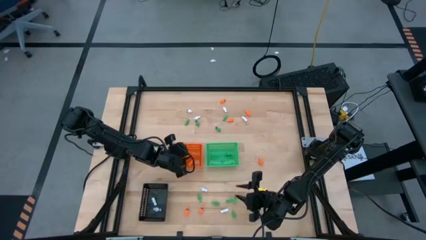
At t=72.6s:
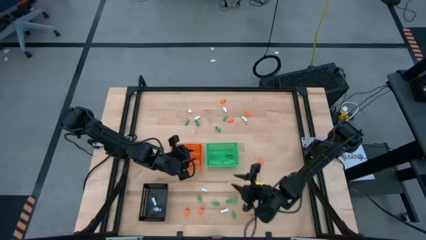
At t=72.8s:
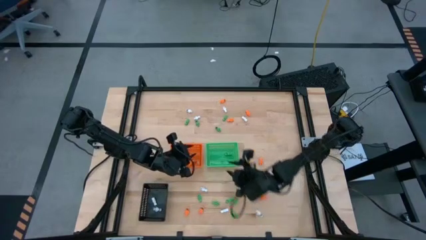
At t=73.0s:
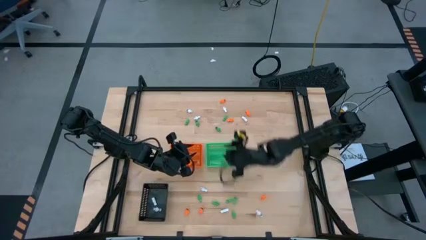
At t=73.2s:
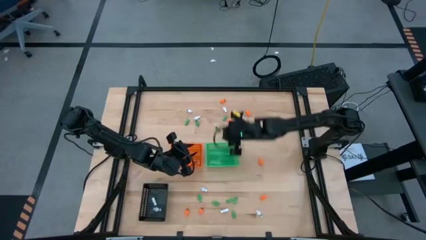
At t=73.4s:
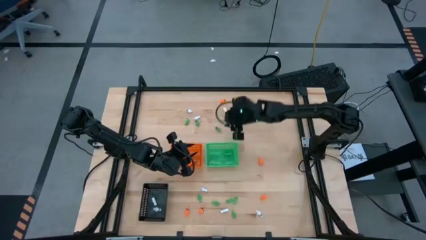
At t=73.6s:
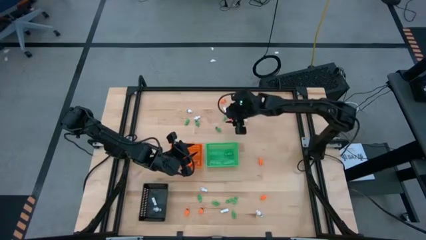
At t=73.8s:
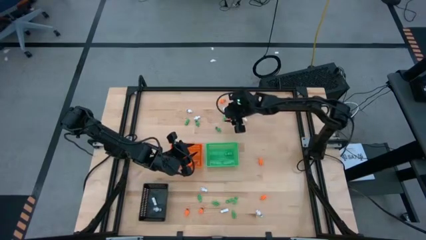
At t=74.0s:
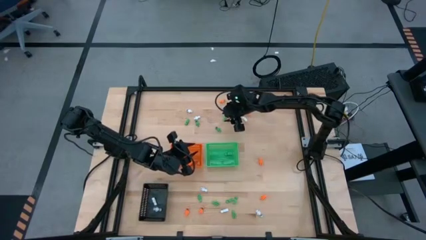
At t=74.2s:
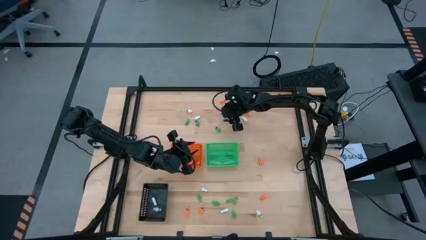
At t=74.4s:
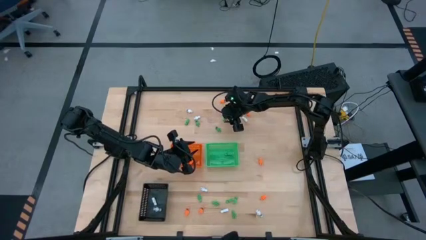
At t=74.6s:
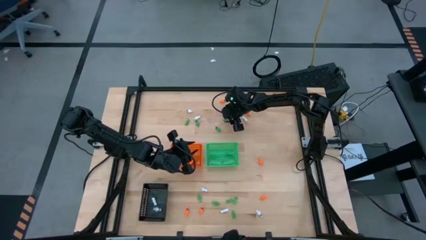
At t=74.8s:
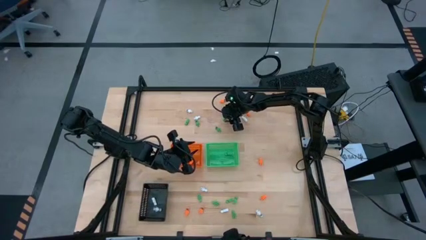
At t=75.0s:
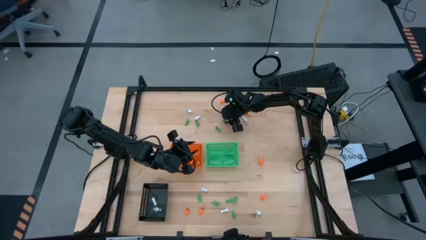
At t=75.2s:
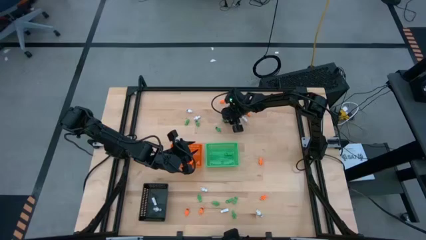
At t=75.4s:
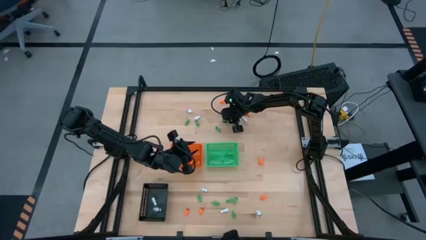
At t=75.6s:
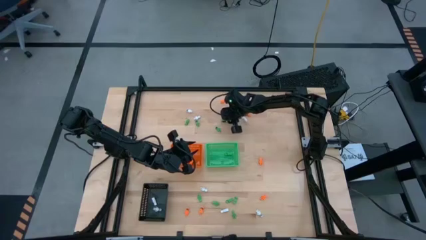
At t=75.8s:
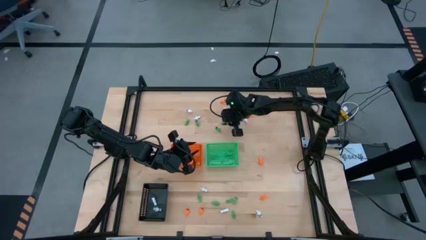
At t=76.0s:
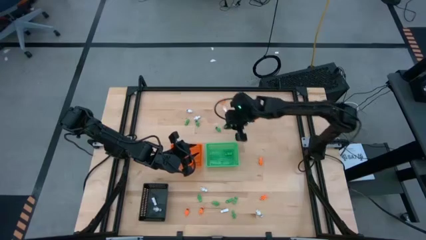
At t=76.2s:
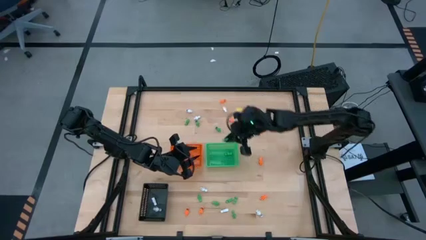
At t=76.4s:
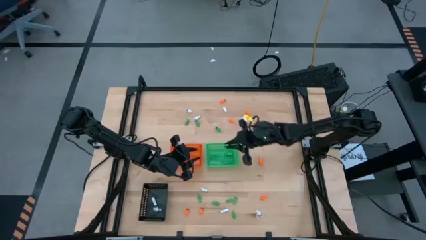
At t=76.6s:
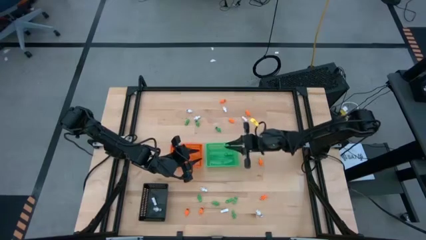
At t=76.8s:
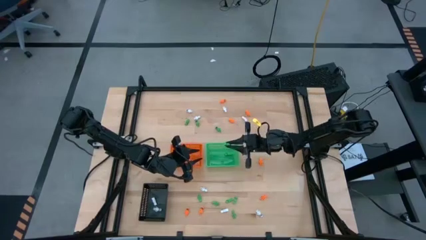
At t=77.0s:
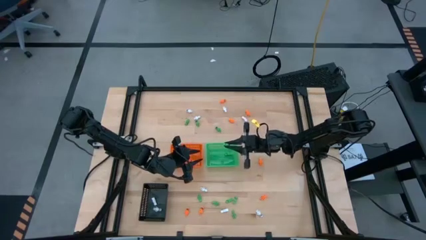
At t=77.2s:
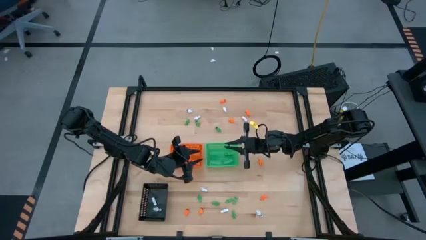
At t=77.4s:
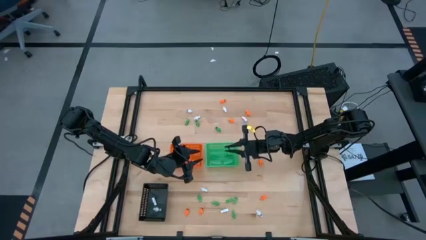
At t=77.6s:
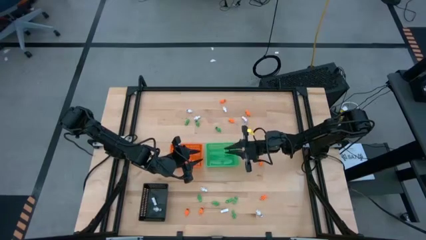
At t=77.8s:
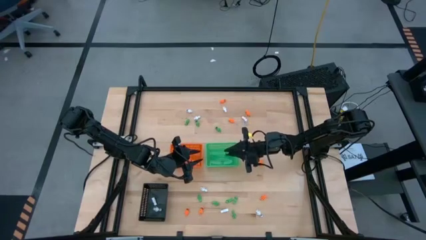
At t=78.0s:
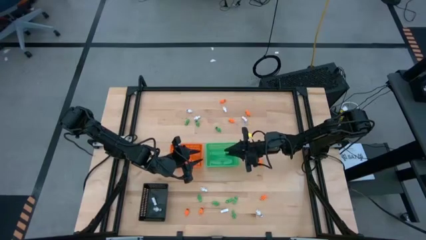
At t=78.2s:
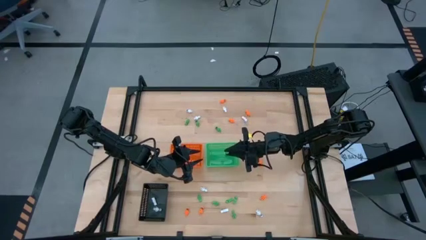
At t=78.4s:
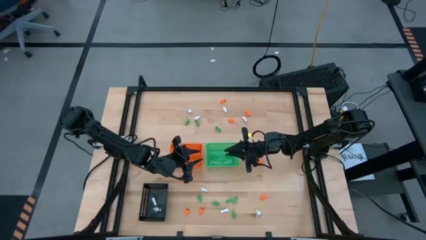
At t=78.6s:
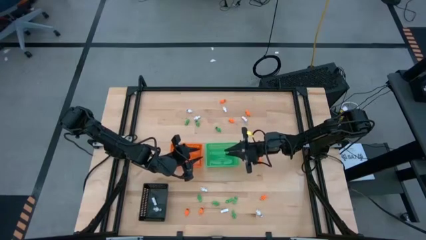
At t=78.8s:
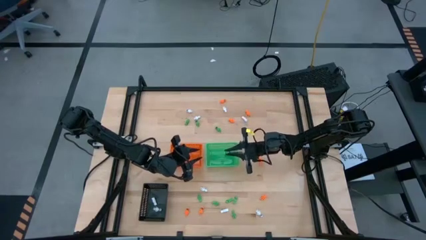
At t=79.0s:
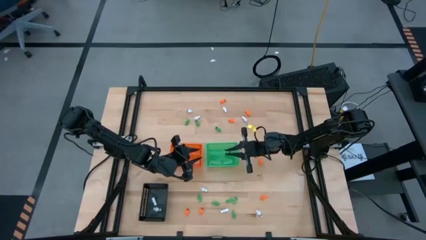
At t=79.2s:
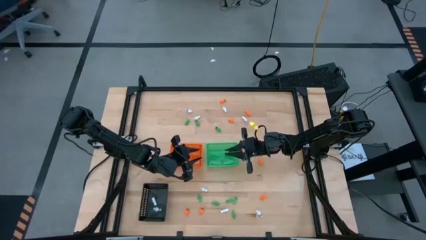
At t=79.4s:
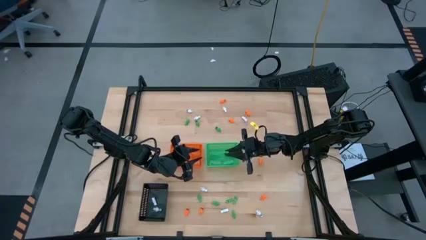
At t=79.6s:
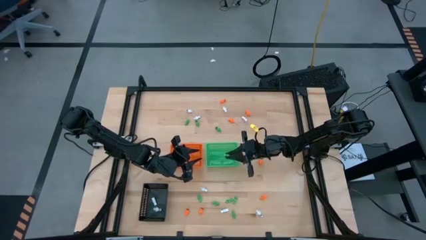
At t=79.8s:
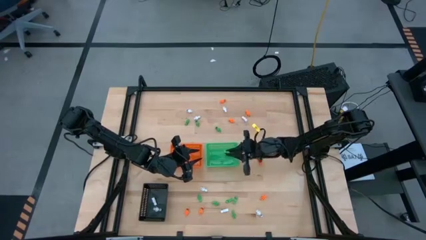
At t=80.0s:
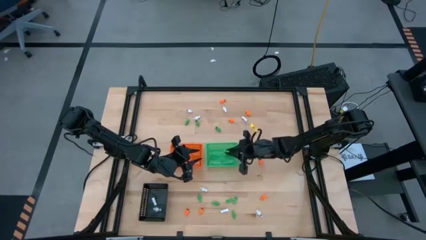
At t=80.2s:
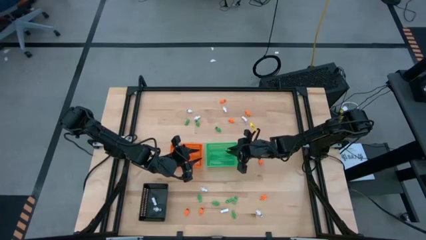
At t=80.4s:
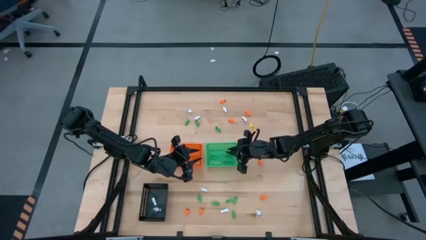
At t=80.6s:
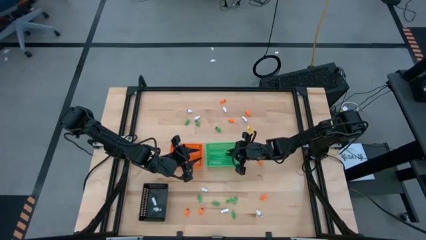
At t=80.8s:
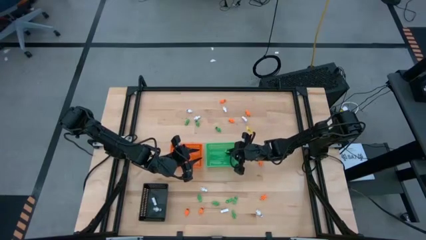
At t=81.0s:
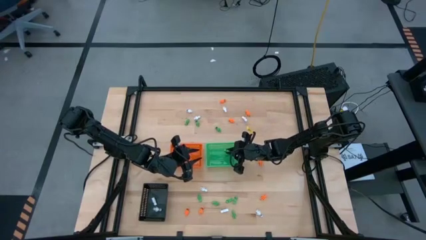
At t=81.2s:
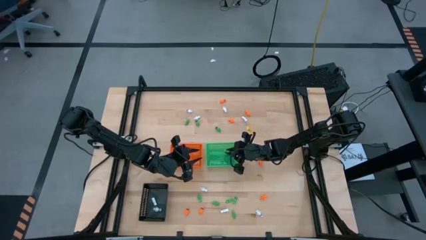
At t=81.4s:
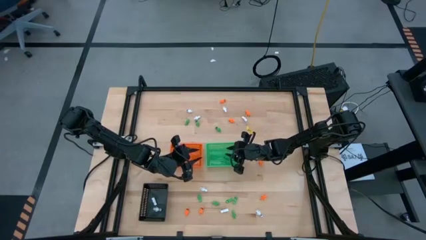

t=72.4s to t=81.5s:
Task: Sort Halloween decoration
Put the green skeleton toy into the green bin

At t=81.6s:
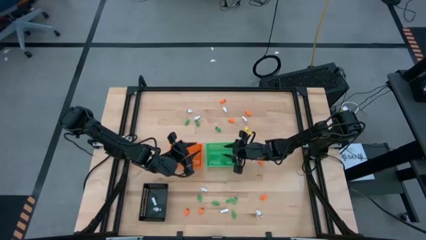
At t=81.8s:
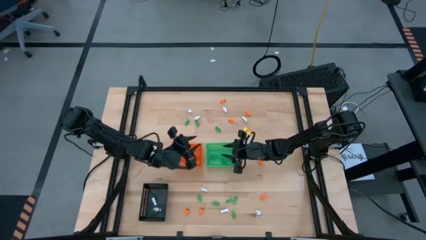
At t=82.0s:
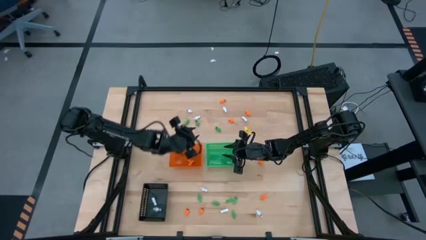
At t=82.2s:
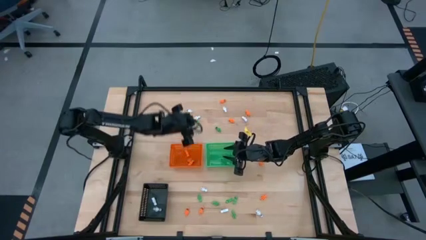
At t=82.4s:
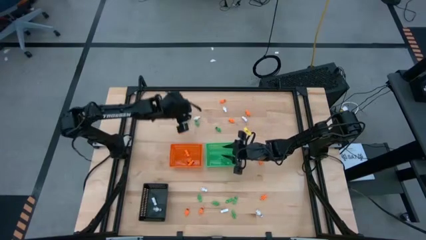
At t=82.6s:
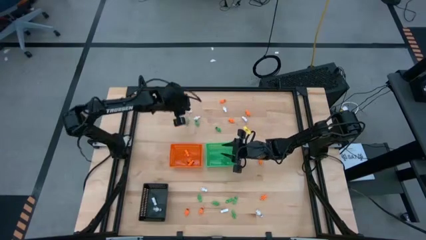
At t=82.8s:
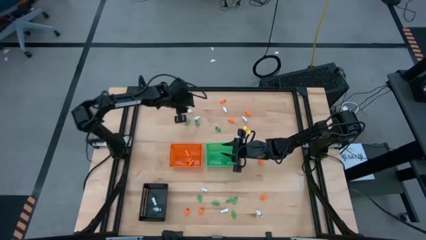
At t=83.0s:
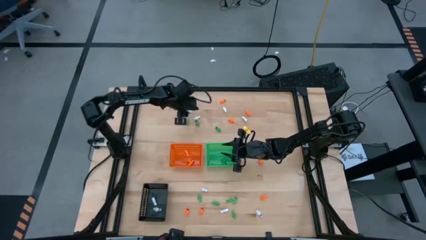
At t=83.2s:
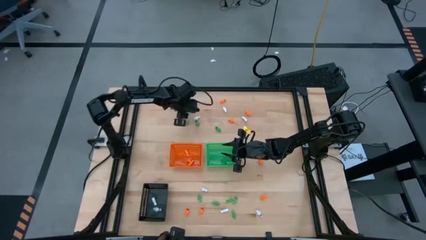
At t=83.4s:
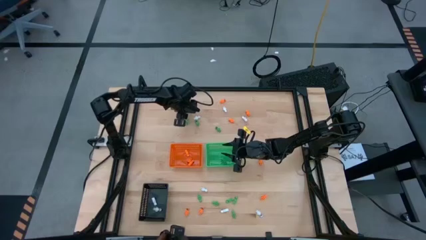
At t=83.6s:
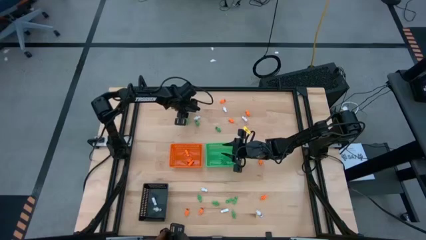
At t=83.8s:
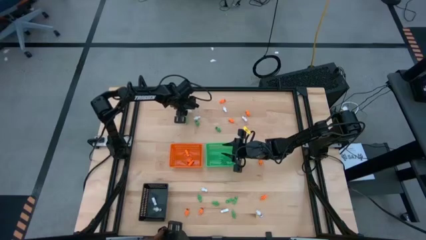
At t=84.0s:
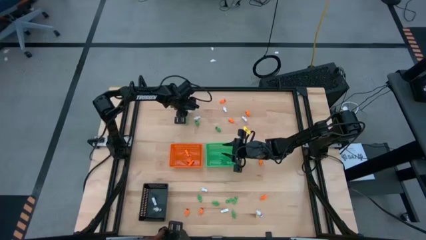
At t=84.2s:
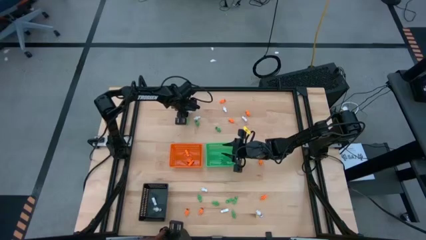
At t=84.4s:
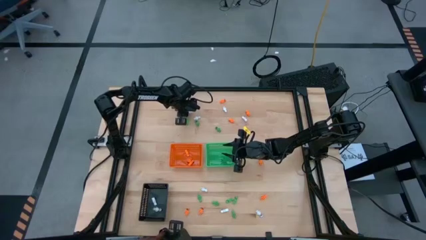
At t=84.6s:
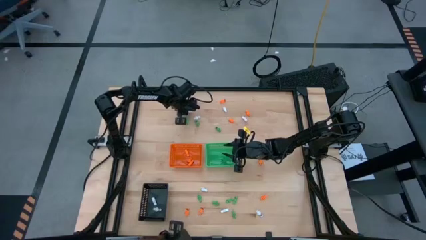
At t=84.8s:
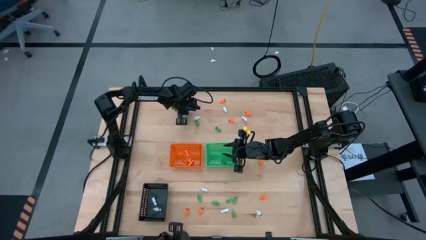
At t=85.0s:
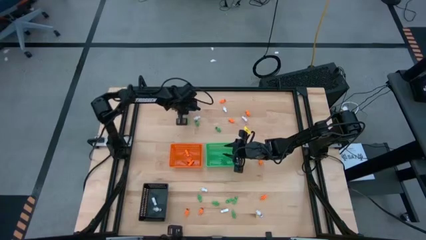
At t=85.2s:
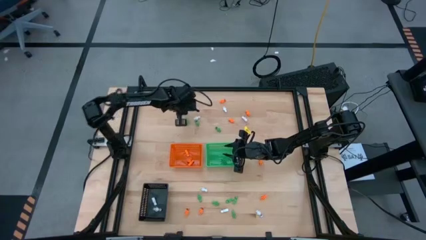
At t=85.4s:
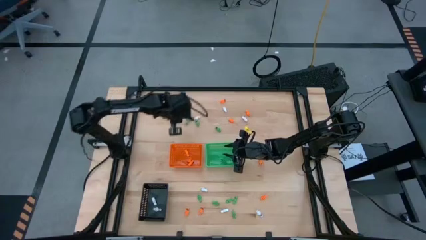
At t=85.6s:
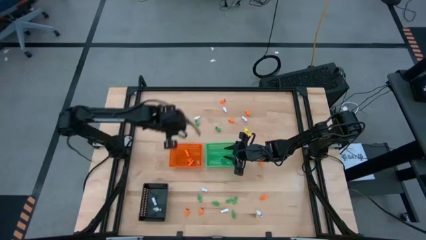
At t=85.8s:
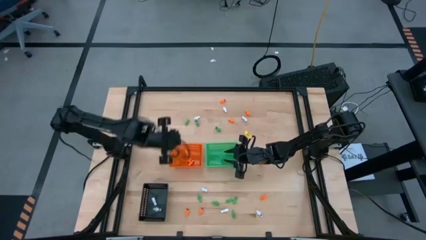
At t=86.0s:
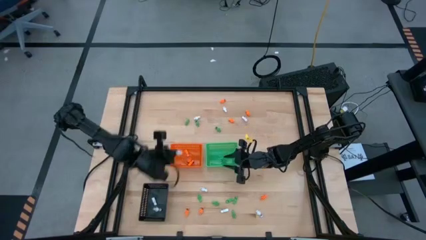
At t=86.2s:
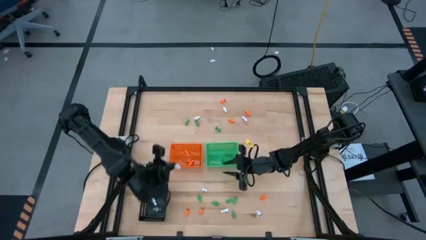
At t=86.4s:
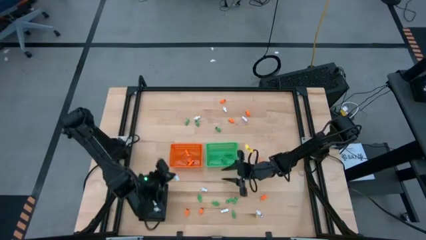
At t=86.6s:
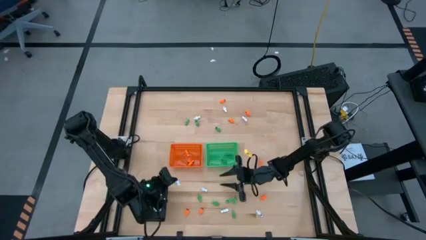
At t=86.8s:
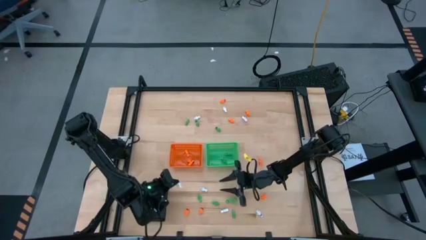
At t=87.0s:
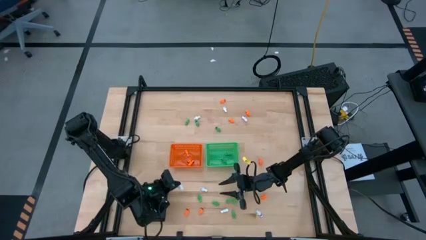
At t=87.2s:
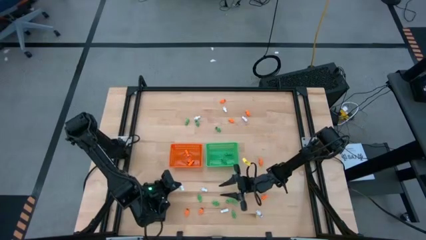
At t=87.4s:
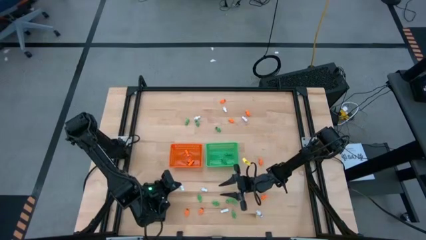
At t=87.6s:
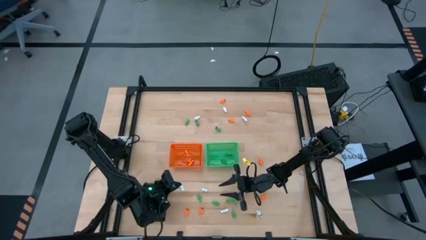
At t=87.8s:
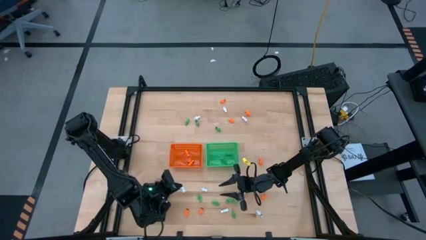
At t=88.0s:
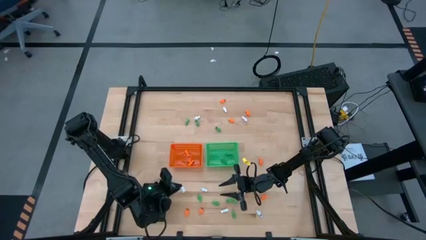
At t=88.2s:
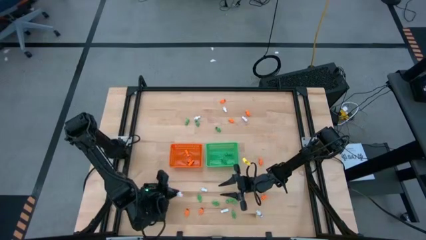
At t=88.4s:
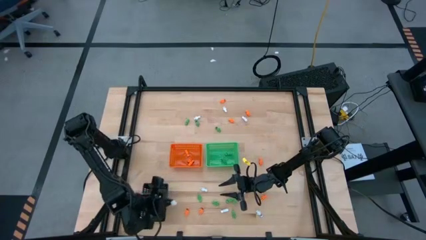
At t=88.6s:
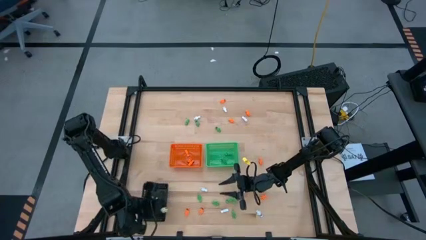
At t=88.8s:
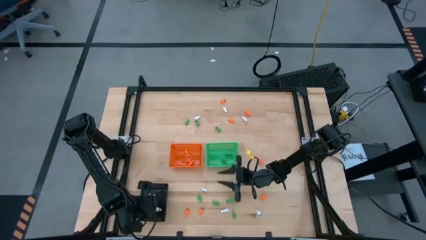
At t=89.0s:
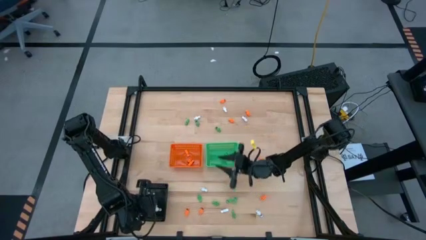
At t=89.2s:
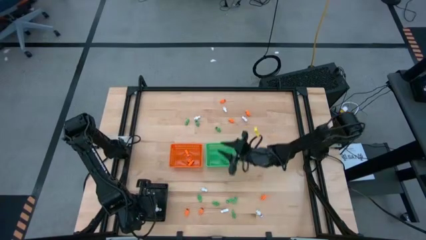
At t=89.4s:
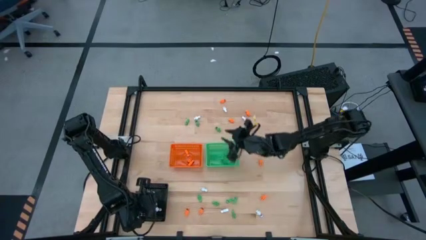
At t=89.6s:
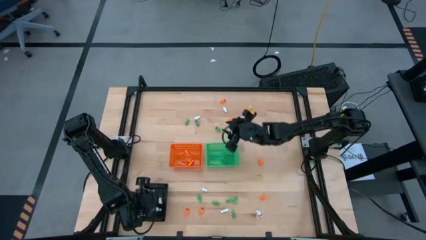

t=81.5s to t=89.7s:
Put the white skeleton toy into the black bin
